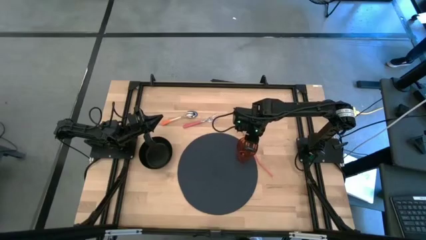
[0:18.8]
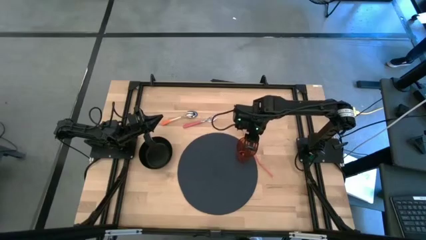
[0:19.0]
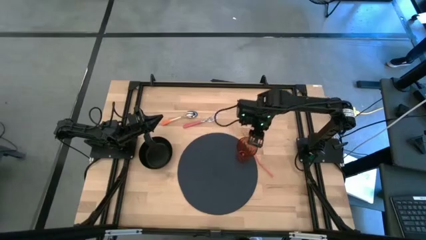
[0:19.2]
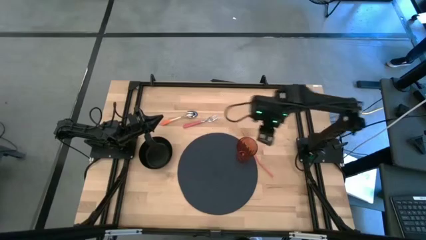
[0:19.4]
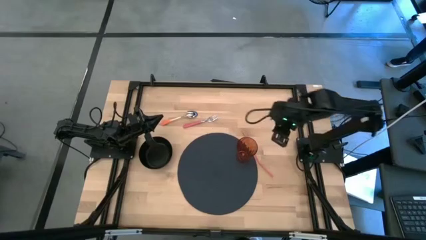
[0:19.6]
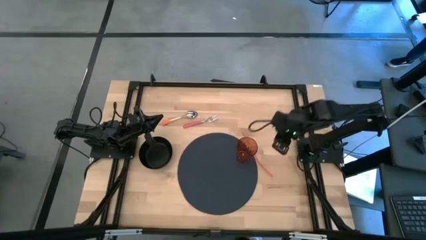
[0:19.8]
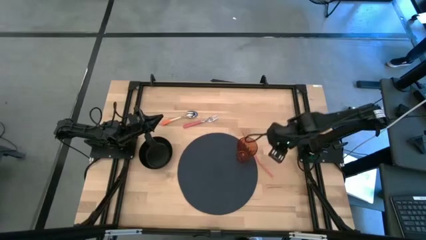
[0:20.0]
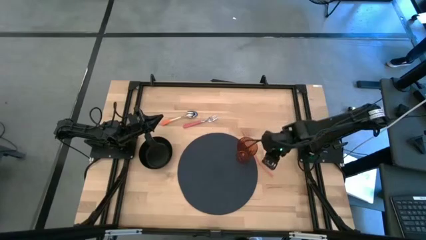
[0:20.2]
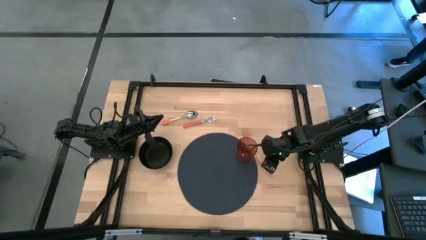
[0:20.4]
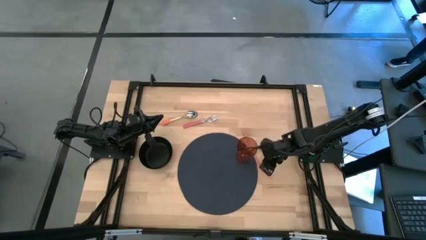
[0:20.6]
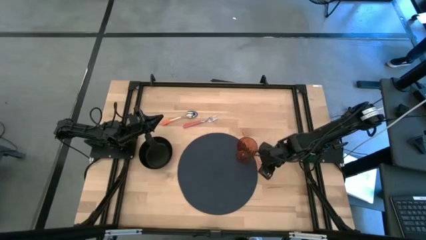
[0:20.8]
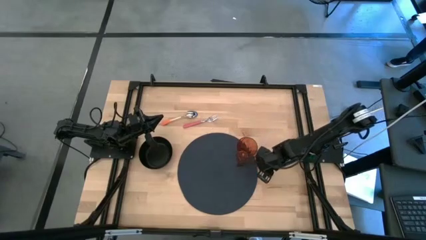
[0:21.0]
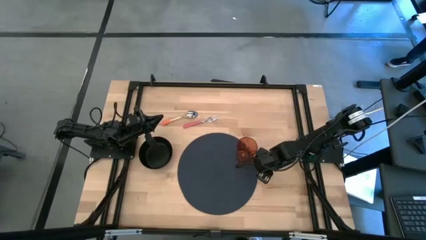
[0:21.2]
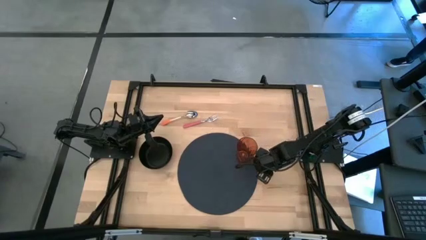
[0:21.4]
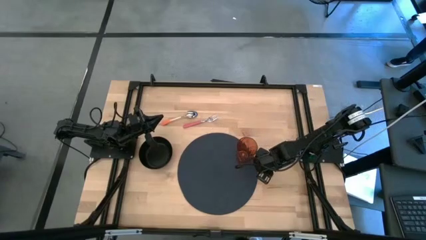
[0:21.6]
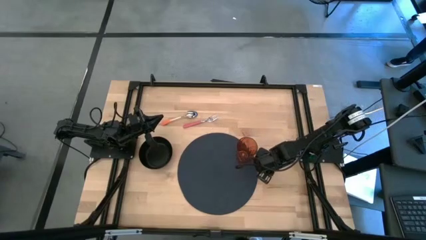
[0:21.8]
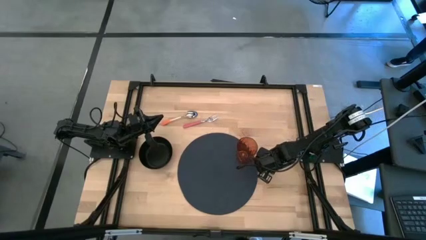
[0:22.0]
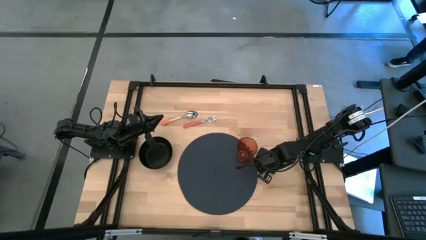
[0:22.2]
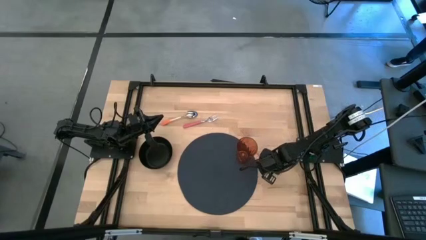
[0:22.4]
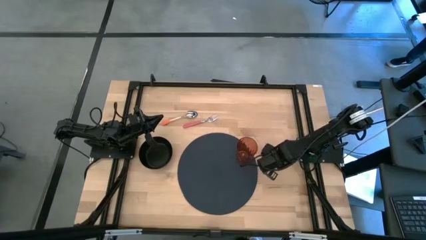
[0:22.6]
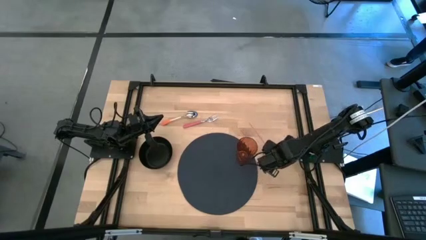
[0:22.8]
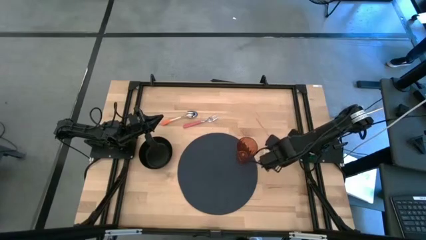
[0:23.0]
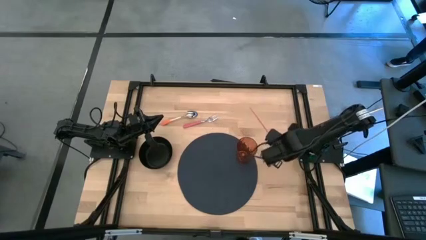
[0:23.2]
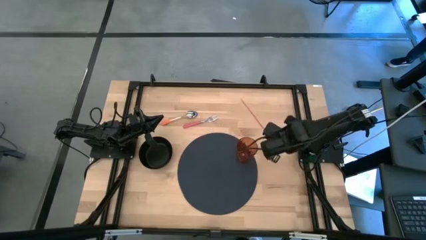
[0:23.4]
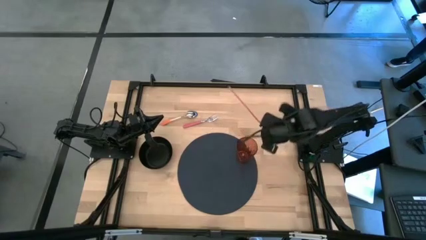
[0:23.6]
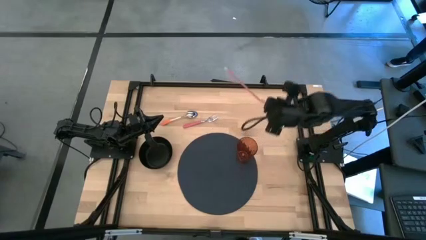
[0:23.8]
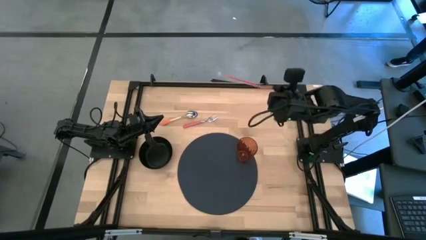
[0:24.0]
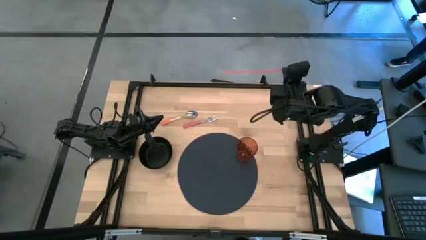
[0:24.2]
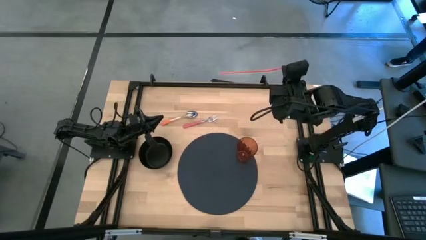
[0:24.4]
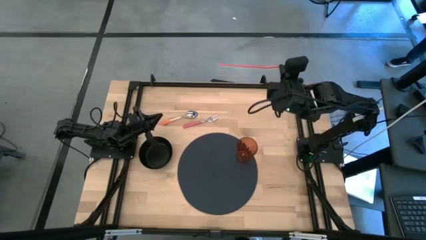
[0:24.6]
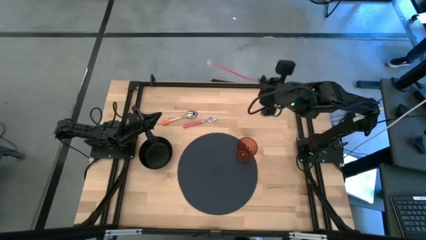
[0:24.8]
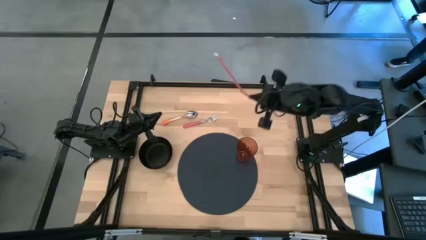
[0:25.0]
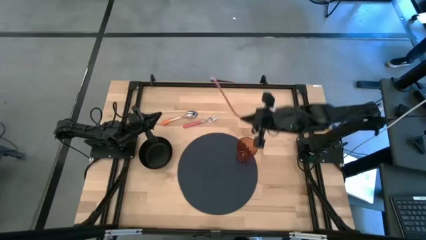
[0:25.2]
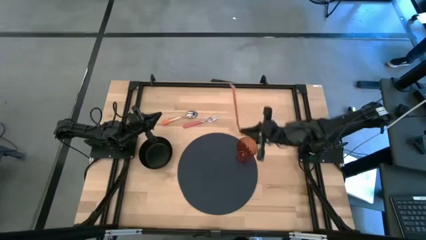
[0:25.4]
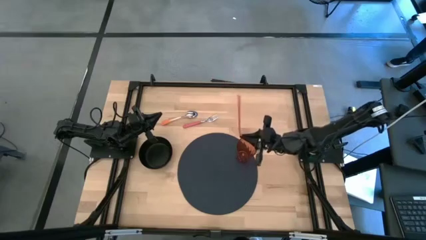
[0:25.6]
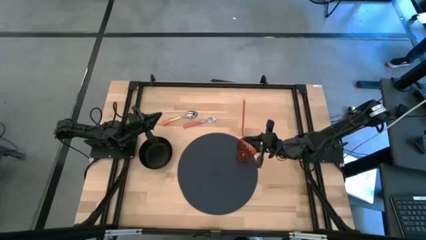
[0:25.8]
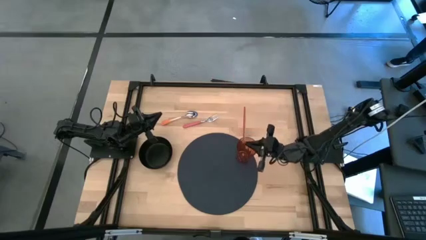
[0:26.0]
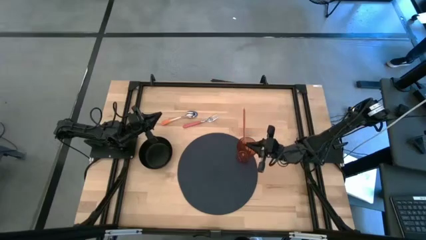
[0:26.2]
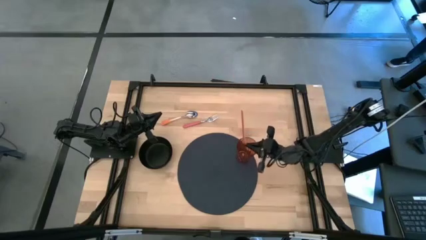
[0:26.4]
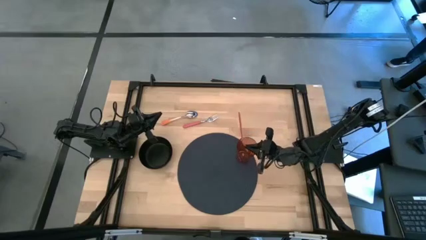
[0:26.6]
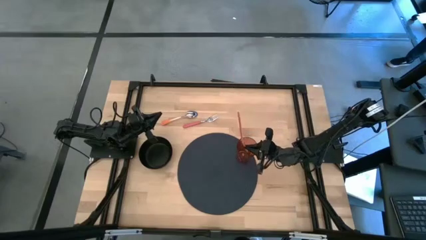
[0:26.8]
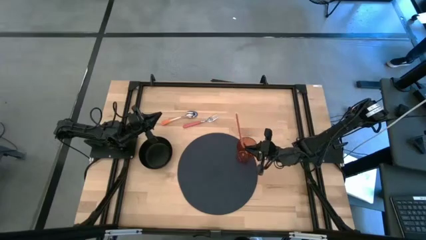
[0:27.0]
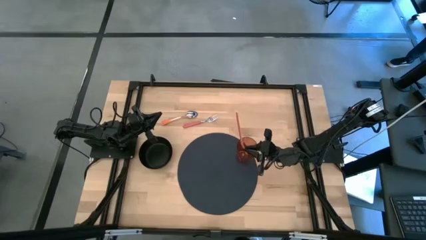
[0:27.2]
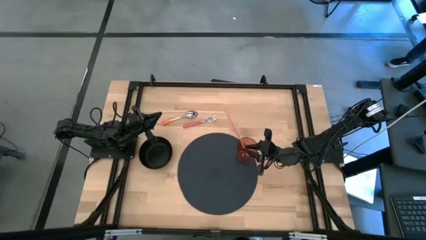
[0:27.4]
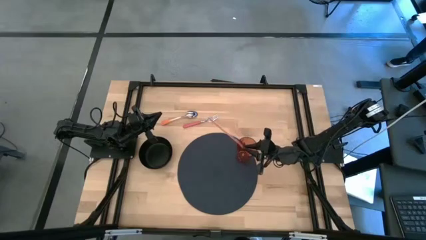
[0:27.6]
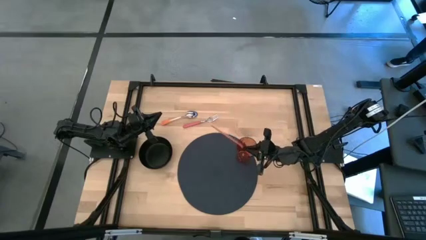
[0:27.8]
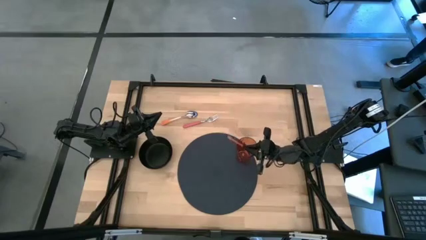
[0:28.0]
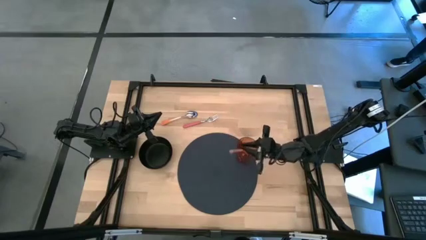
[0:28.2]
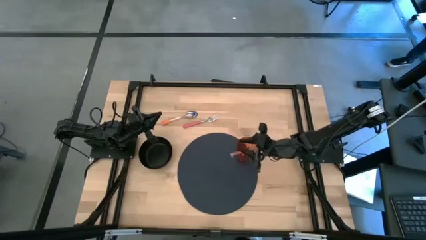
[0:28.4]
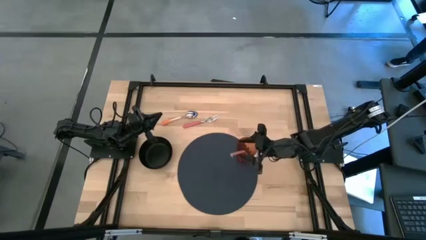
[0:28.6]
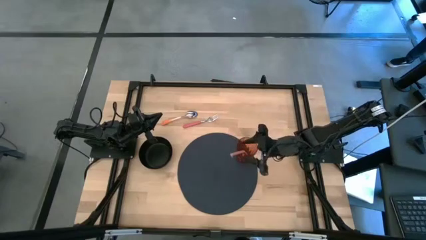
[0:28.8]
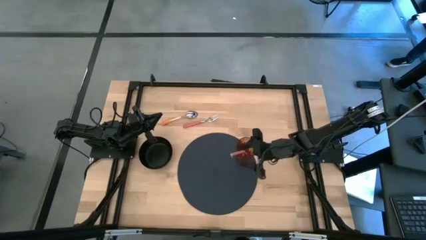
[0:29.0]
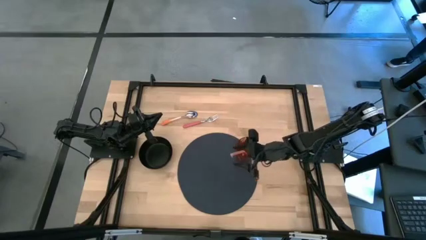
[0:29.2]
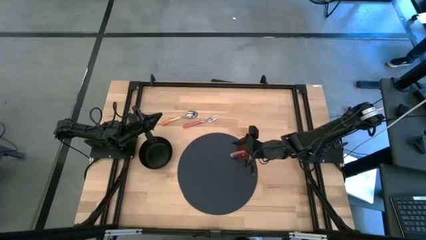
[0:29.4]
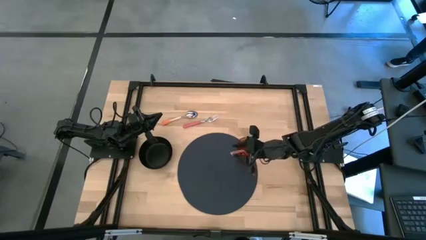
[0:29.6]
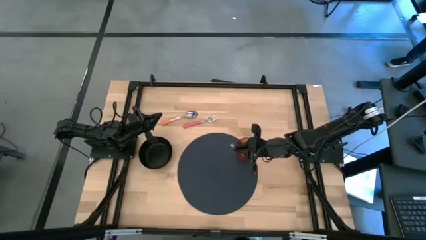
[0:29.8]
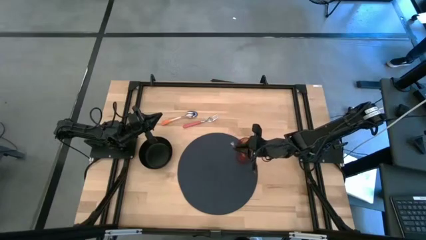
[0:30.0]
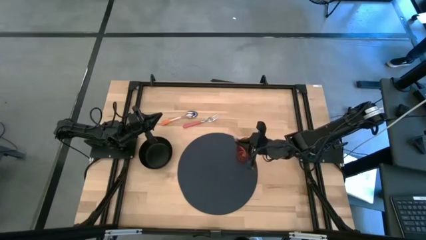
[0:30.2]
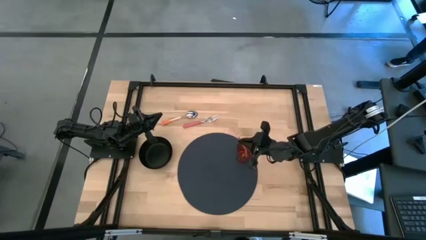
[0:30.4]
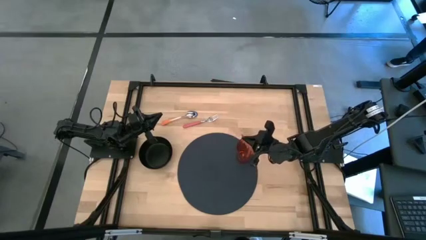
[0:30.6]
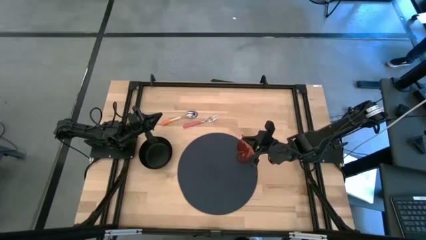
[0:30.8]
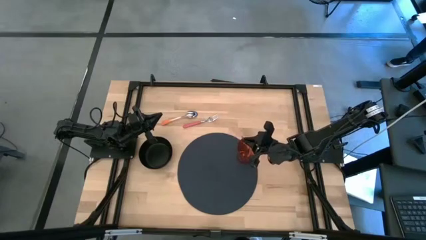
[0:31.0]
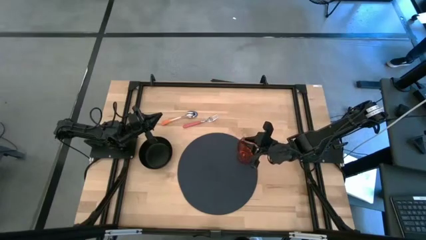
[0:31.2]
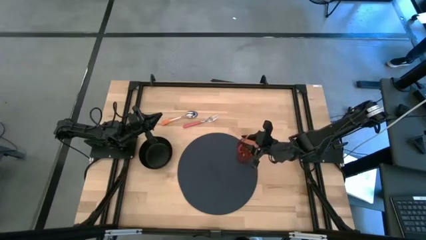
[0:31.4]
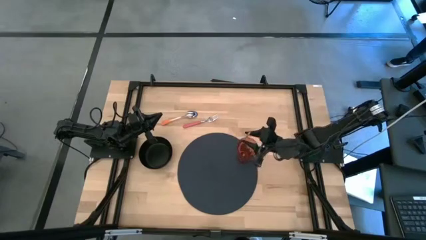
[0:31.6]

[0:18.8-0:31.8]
Task: Pick & Place Utensil
Put the orange straw into the brown cup on the dark blue mat
